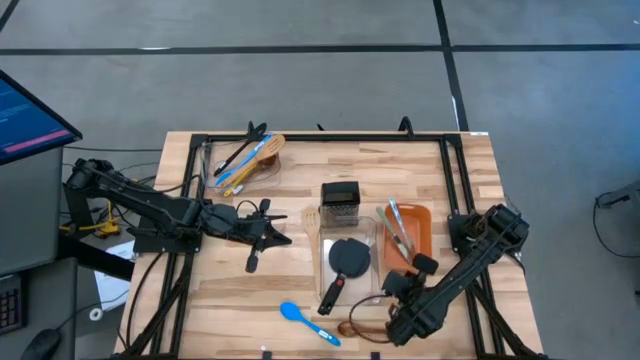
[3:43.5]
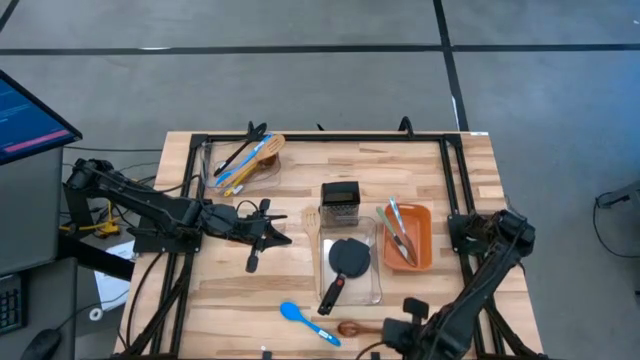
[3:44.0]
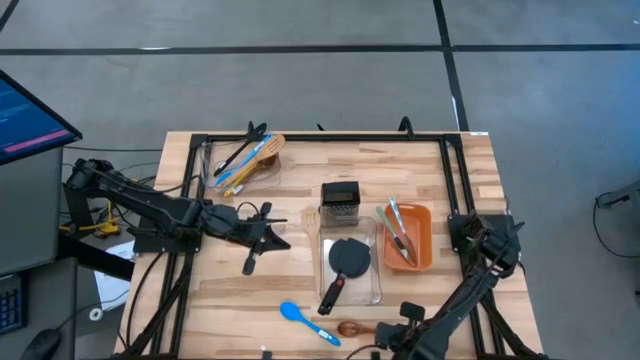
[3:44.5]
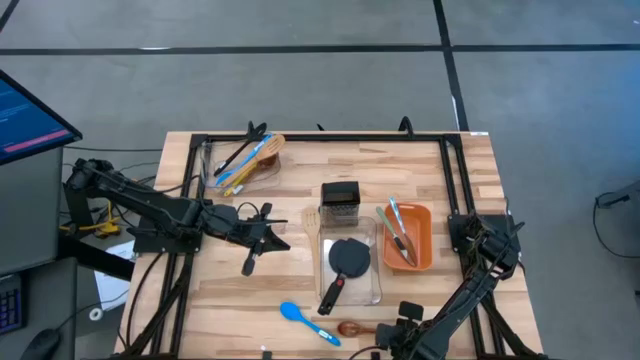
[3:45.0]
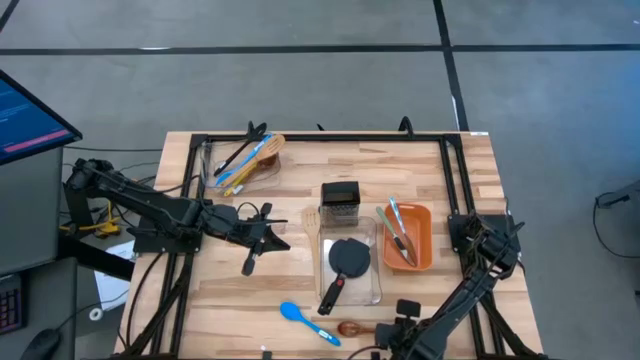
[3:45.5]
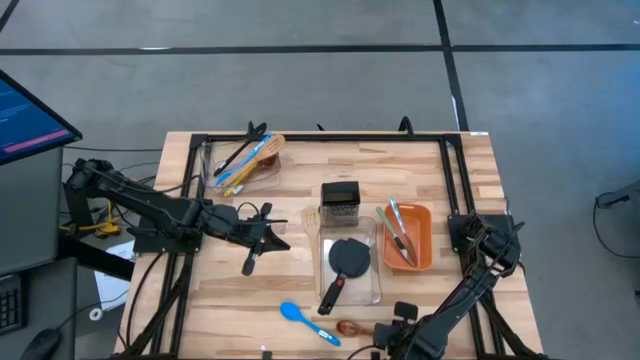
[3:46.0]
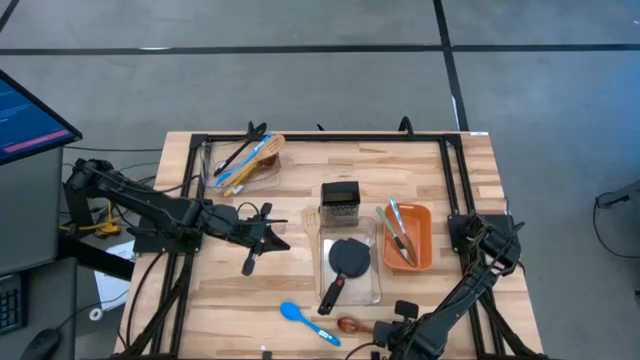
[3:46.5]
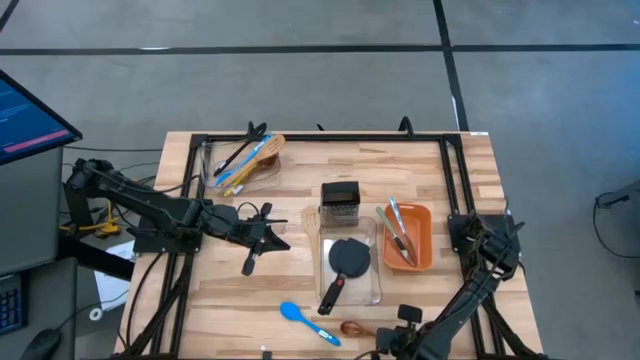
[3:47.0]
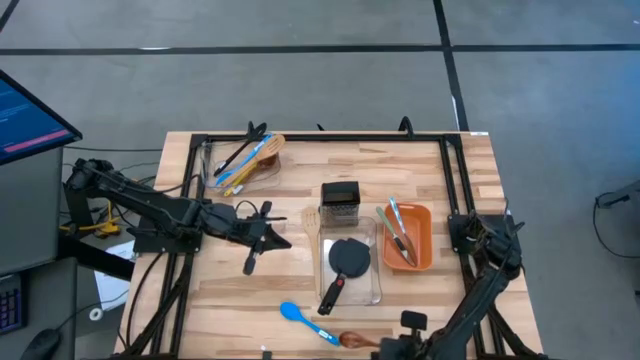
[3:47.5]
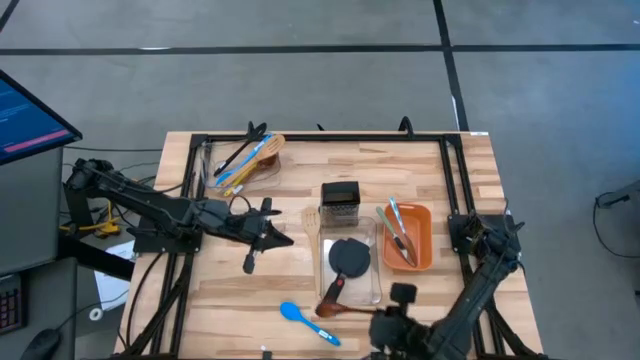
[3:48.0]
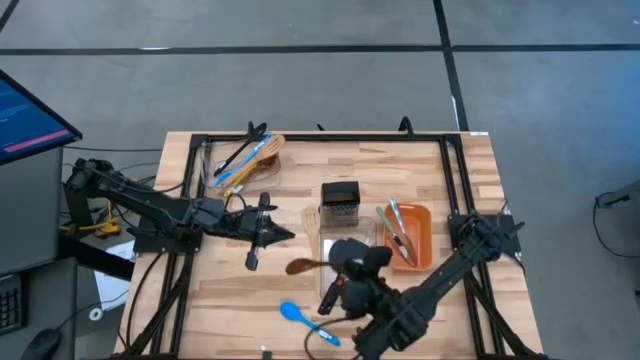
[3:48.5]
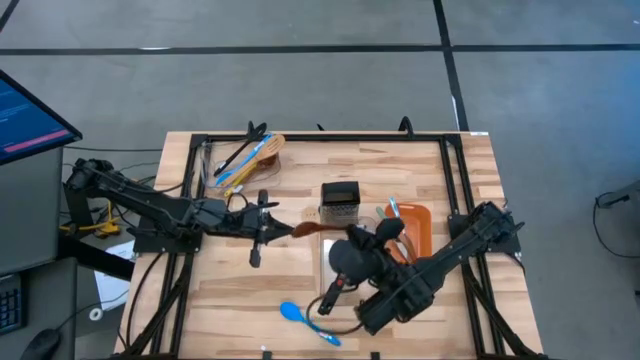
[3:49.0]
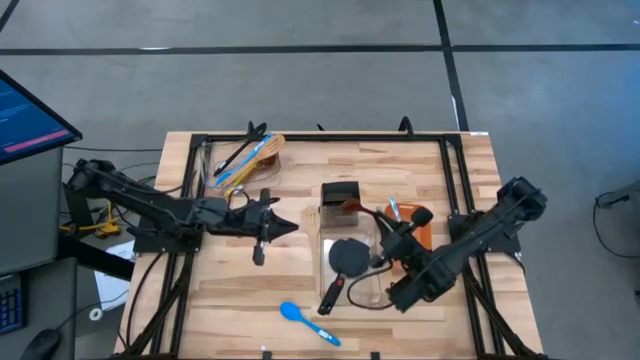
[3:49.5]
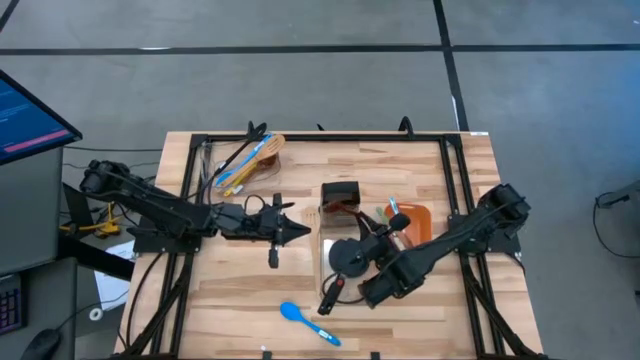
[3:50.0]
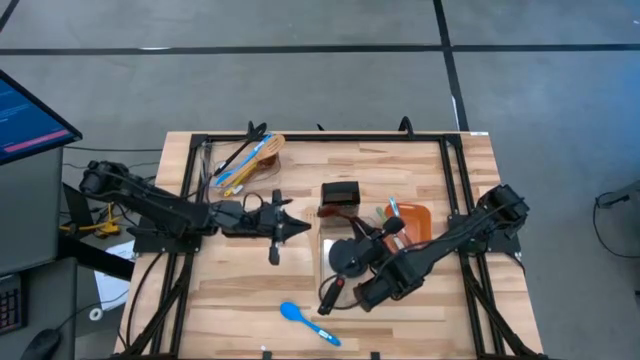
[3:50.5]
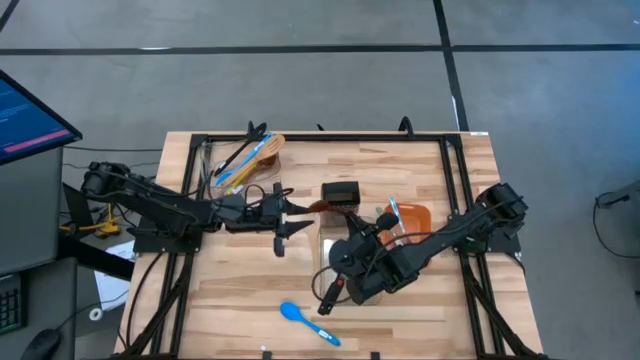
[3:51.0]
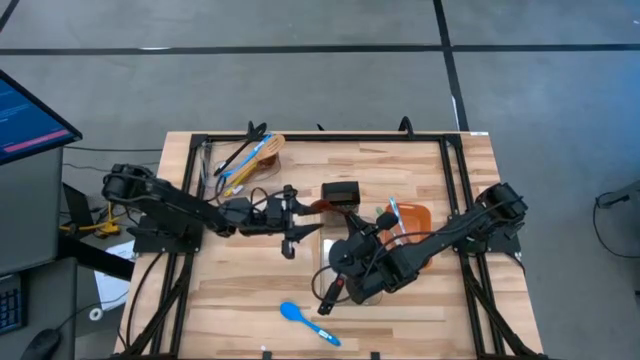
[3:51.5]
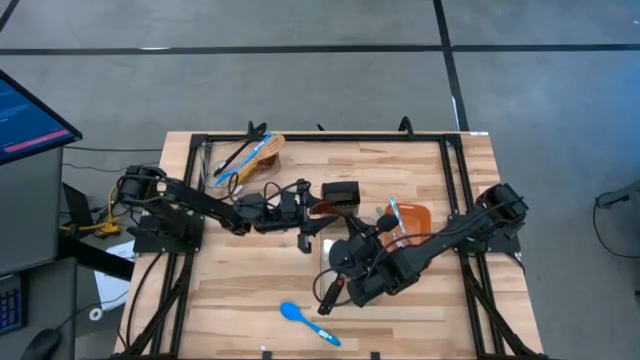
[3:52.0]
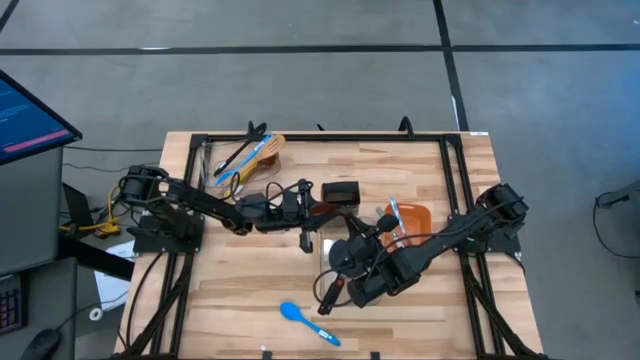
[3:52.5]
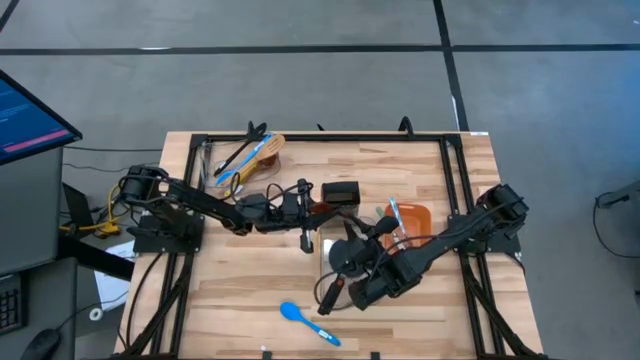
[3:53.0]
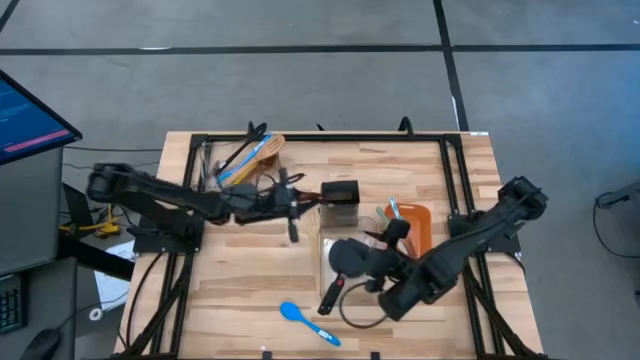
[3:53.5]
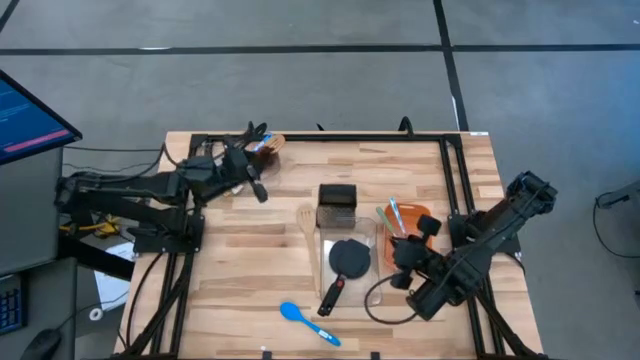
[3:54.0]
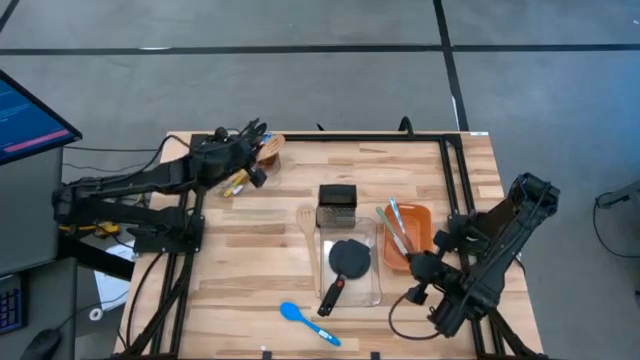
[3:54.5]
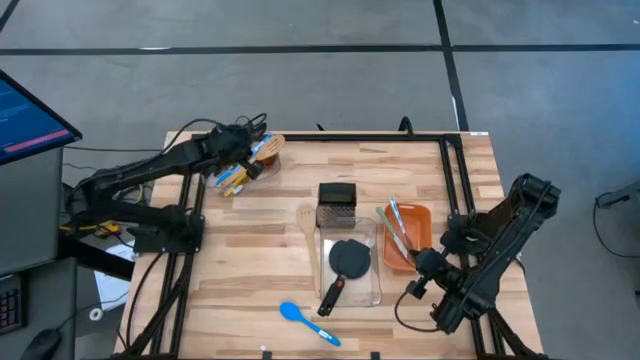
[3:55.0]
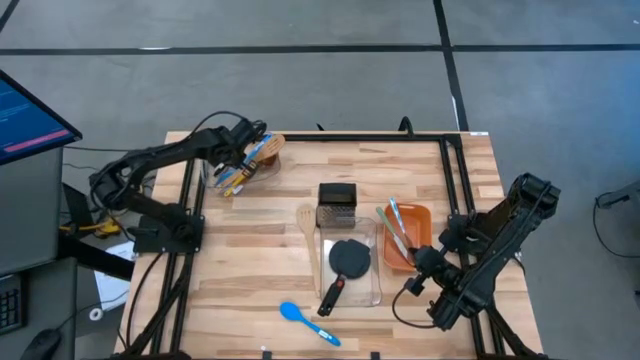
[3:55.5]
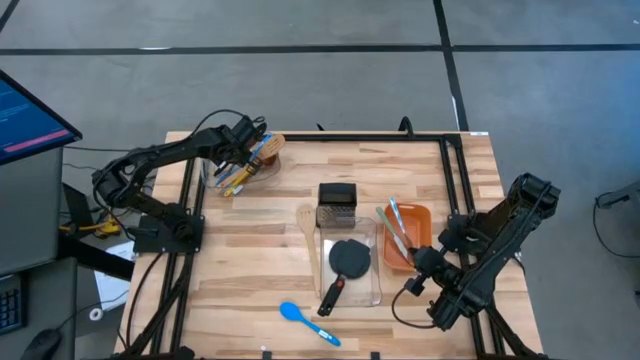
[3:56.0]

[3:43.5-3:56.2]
Task: Pick & Place Kitchen Items
Put the brown ladle into the top transparent bin

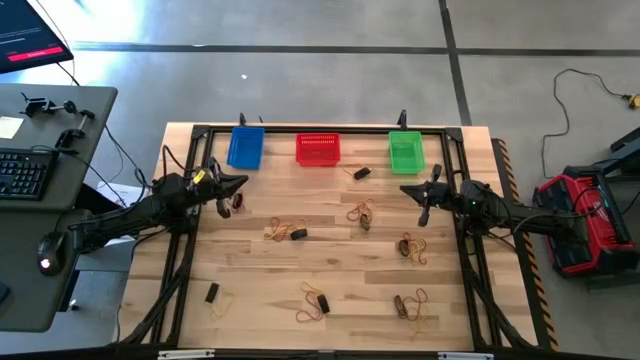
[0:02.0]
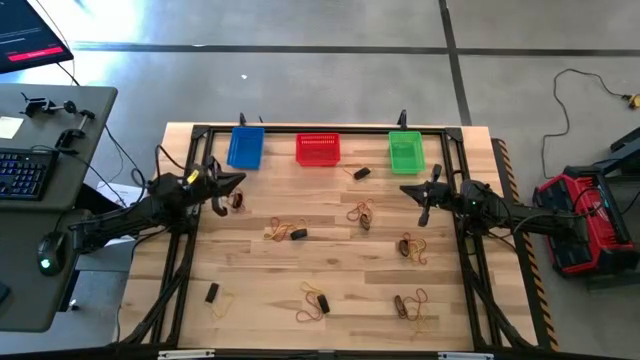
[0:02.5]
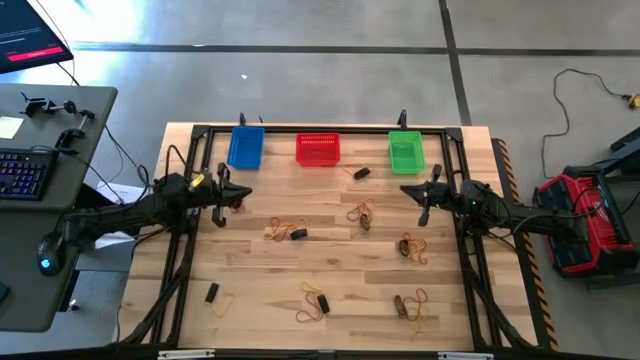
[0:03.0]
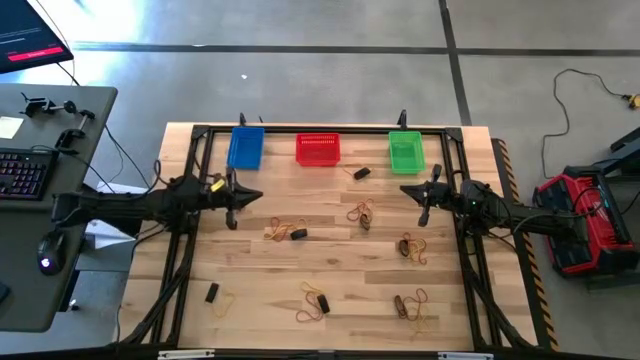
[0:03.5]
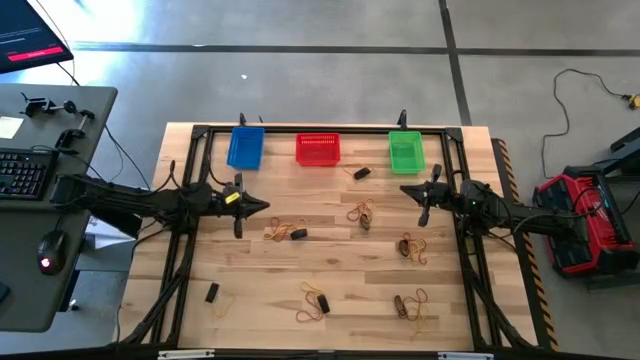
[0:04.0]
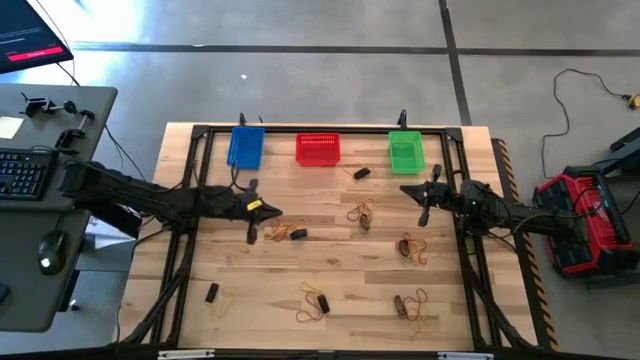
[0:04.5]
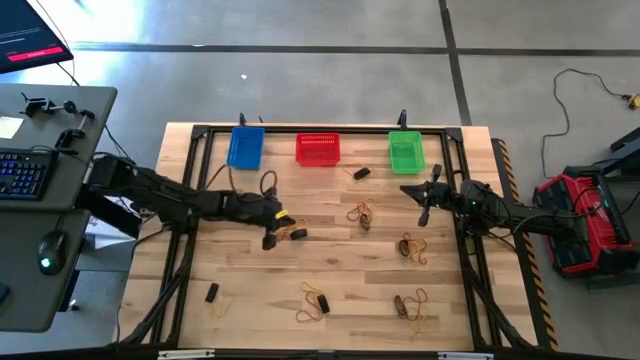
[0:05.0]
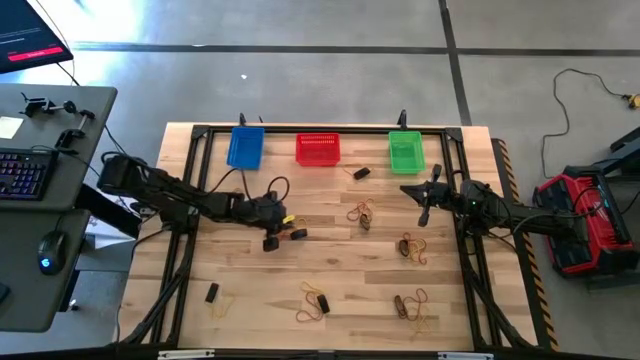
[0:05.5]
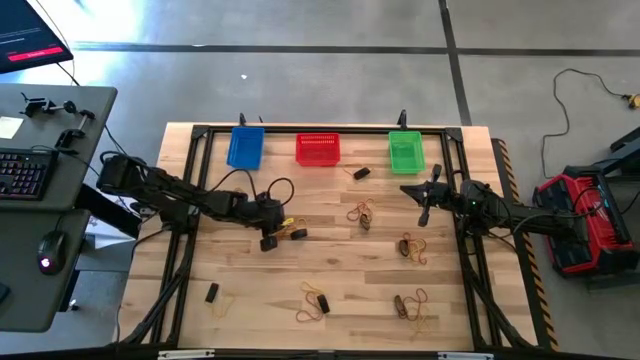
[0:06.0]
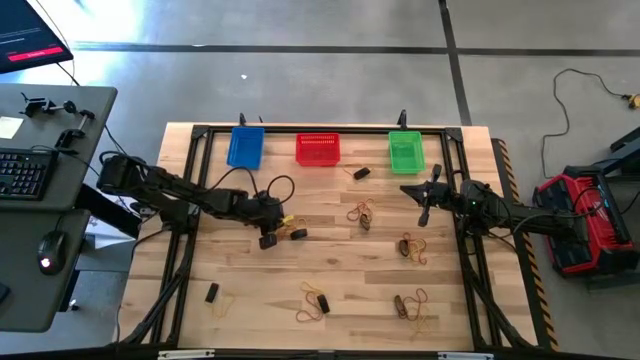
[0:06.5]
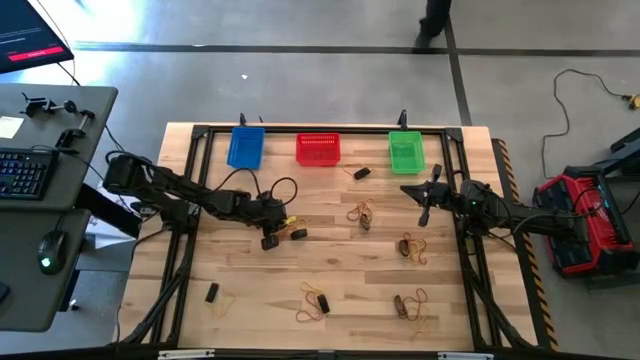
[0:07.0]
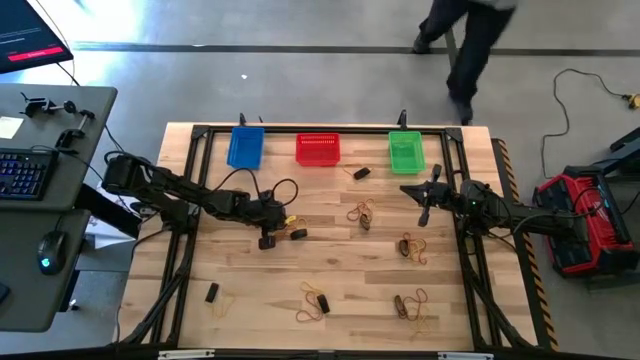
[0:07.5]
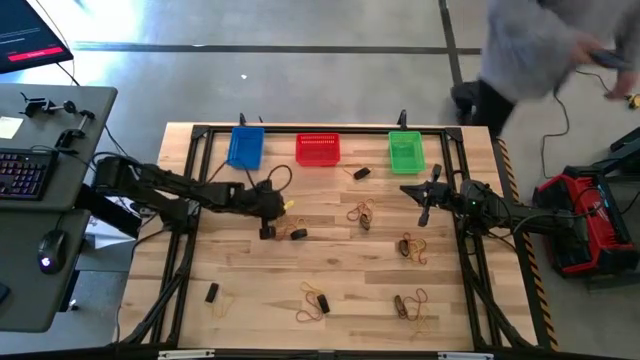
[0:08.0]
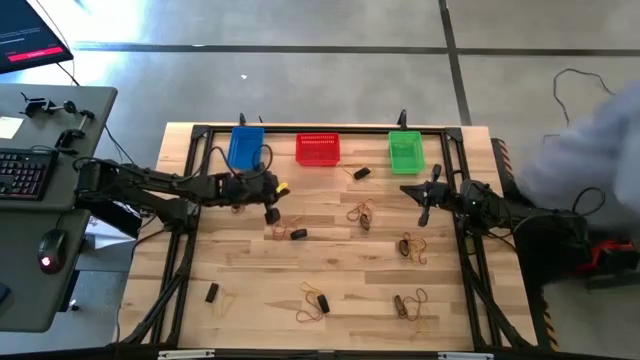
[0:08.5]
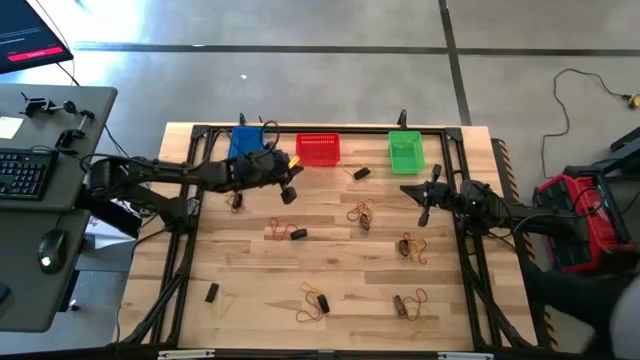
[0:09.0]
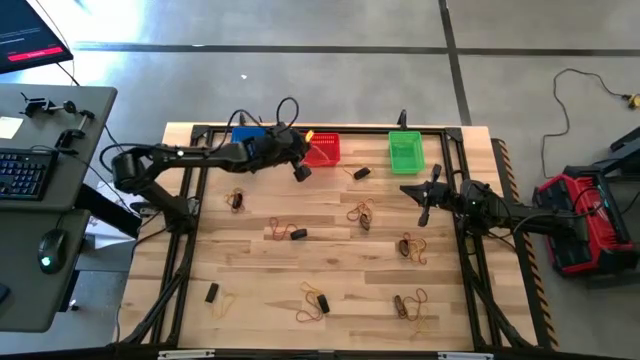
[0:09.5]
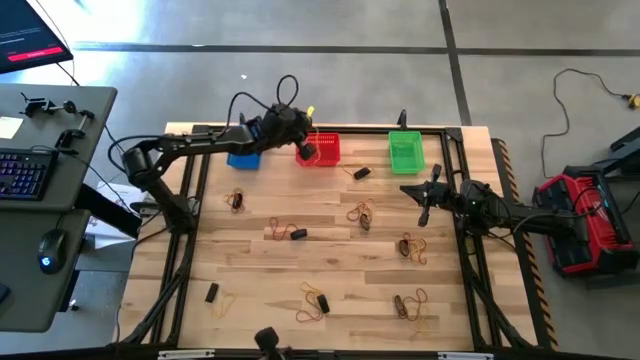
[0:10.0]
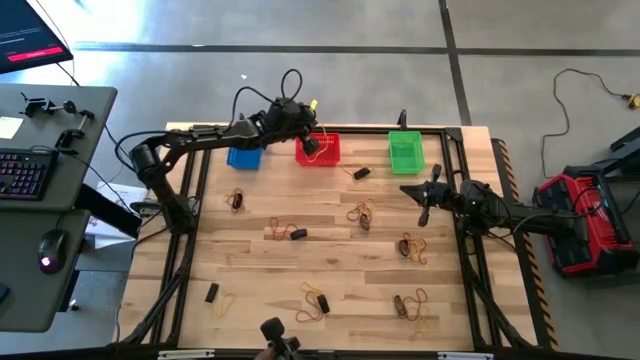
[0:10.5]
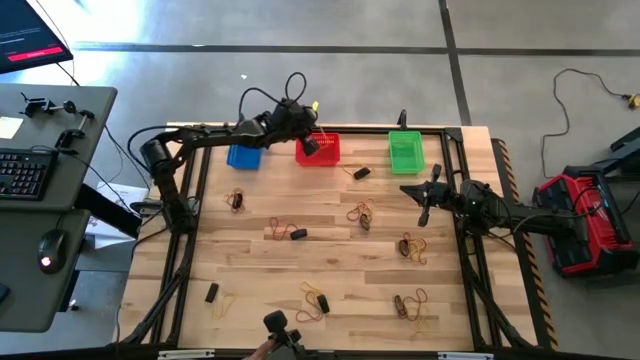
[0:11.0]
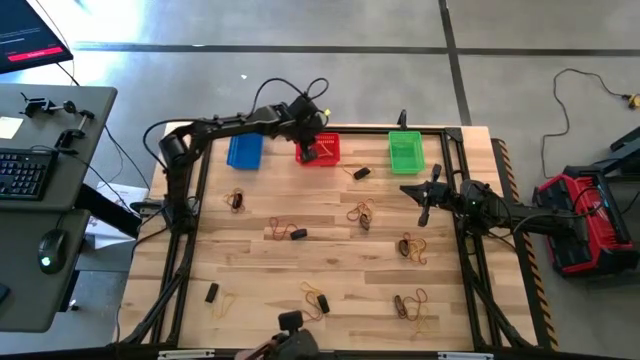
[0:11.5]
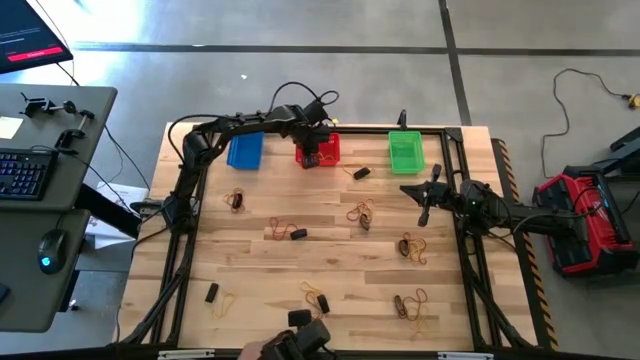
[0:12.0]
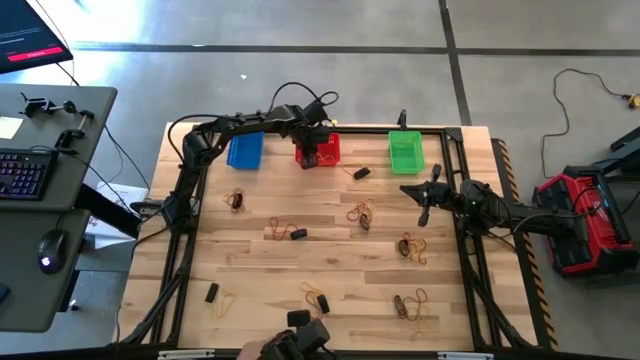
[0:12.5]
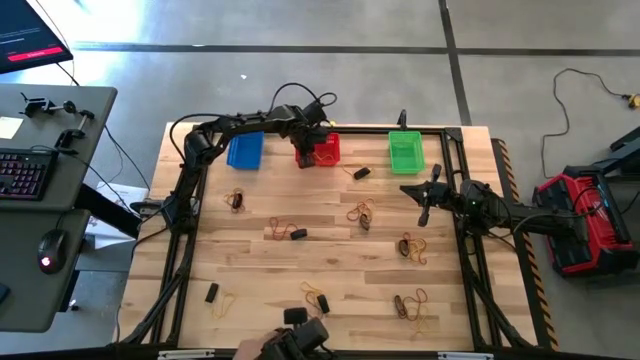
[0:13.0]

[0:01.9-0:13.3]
Task: Sort rubber bands into baskets
Put the yellow rubberband into the orange bin
